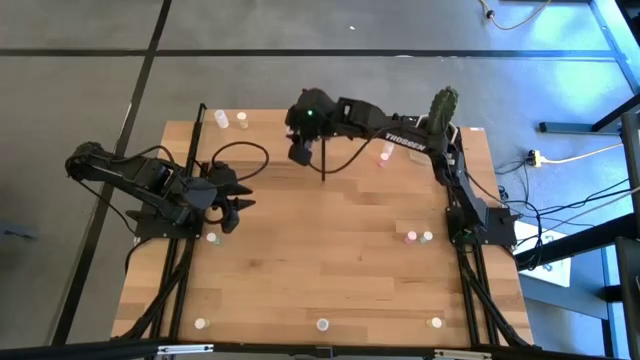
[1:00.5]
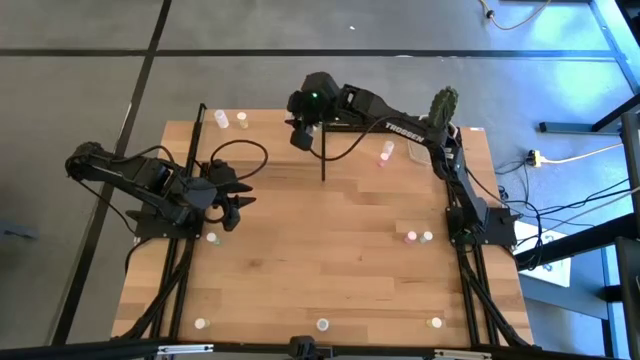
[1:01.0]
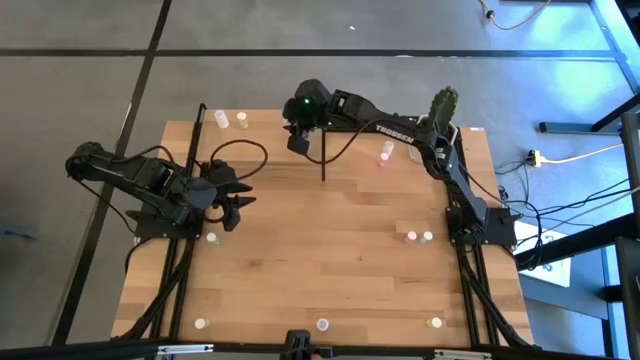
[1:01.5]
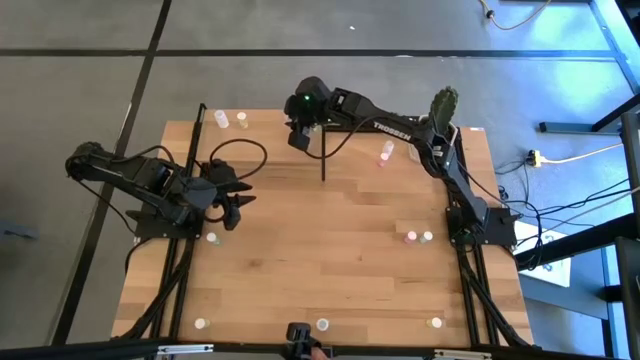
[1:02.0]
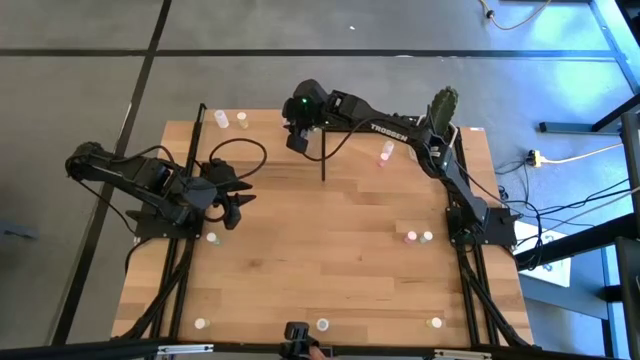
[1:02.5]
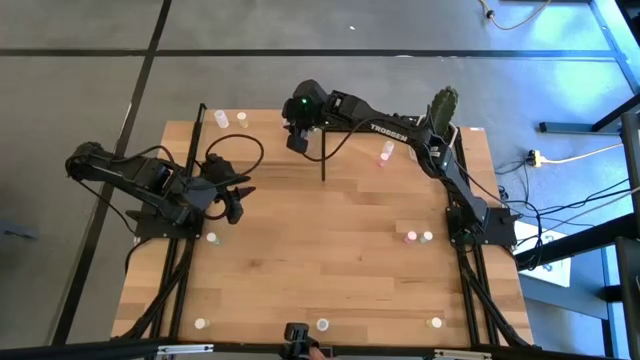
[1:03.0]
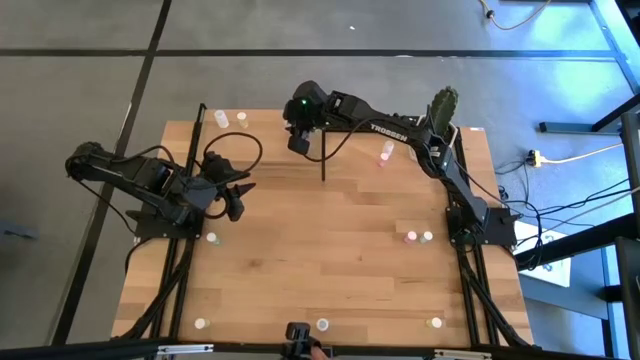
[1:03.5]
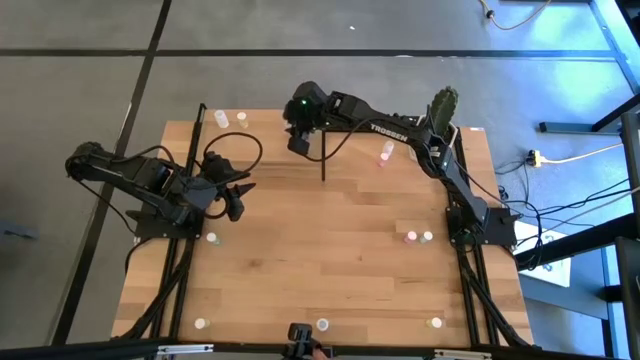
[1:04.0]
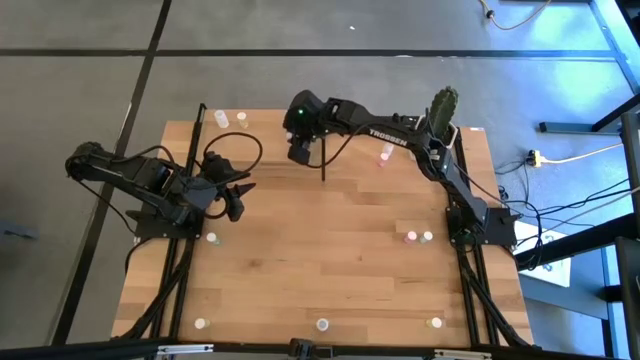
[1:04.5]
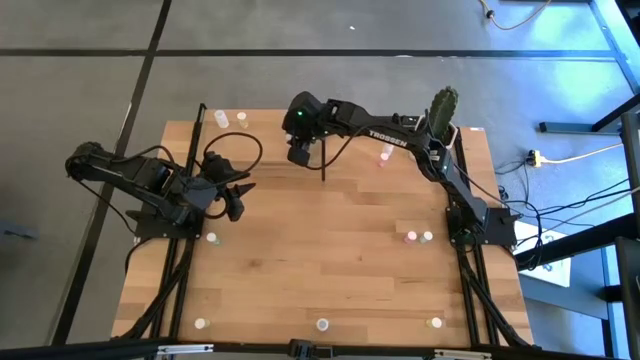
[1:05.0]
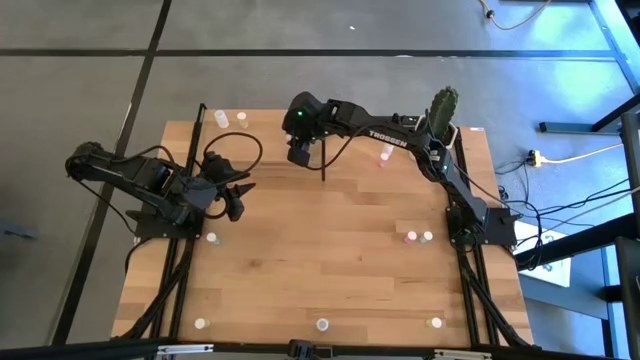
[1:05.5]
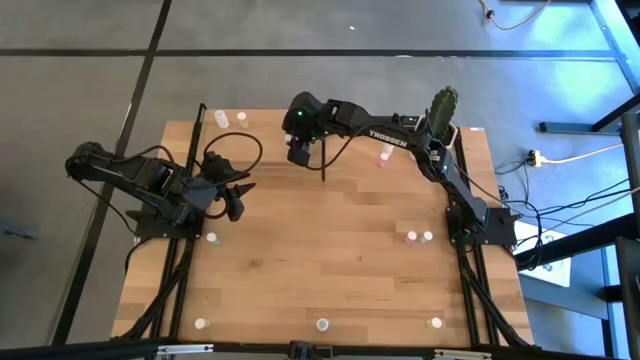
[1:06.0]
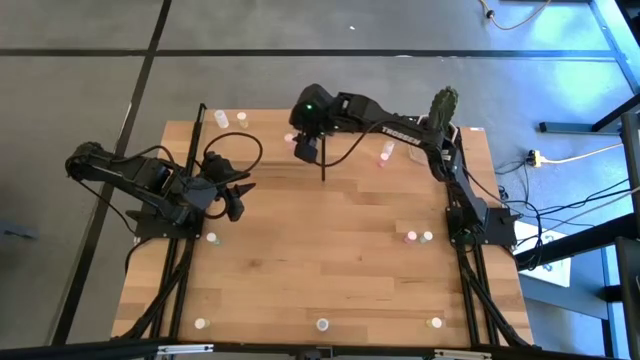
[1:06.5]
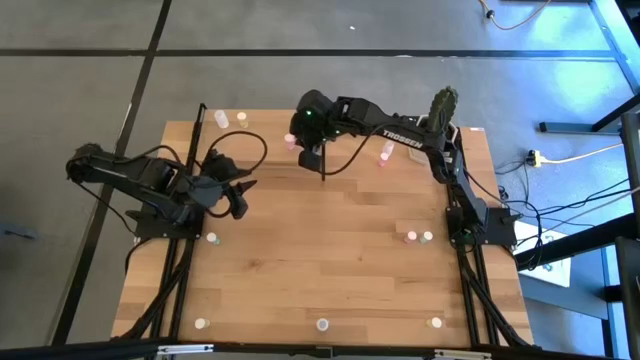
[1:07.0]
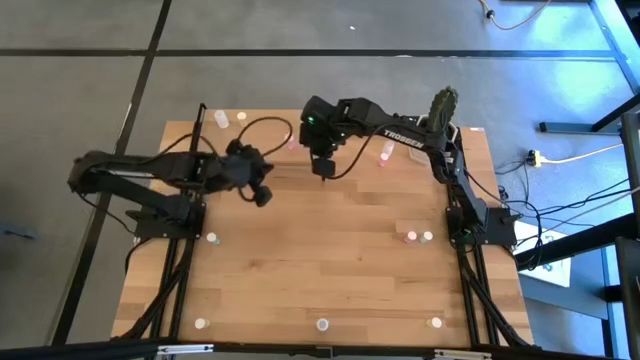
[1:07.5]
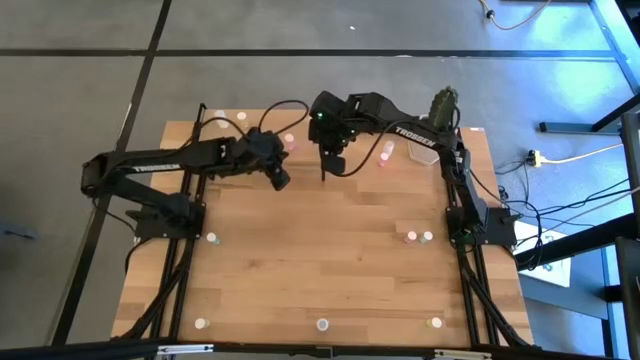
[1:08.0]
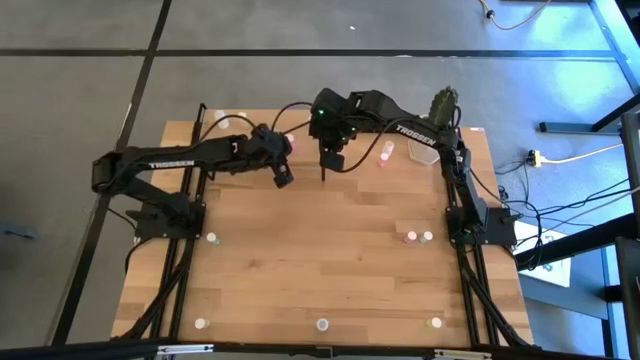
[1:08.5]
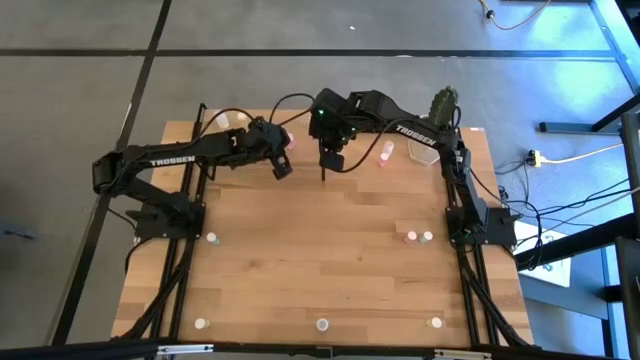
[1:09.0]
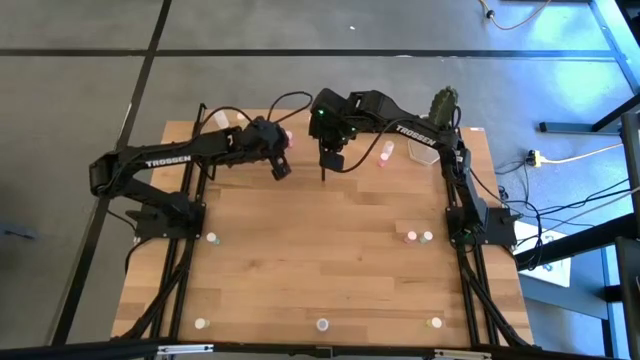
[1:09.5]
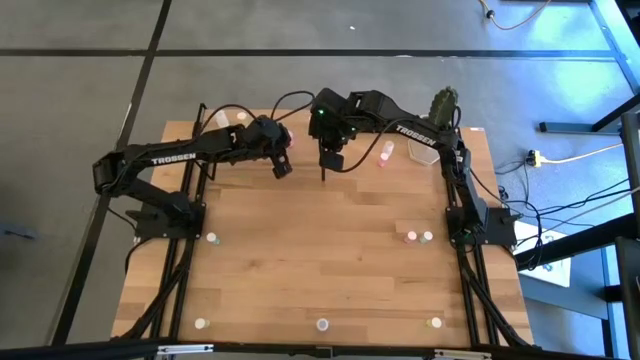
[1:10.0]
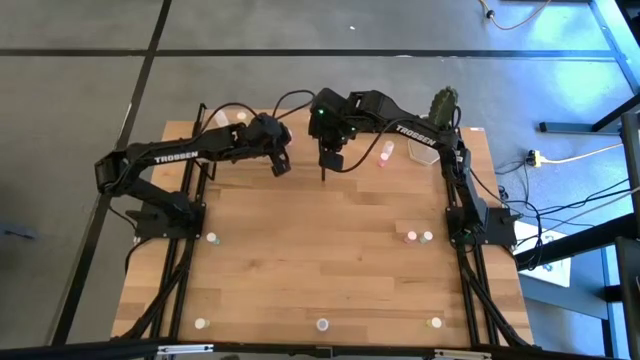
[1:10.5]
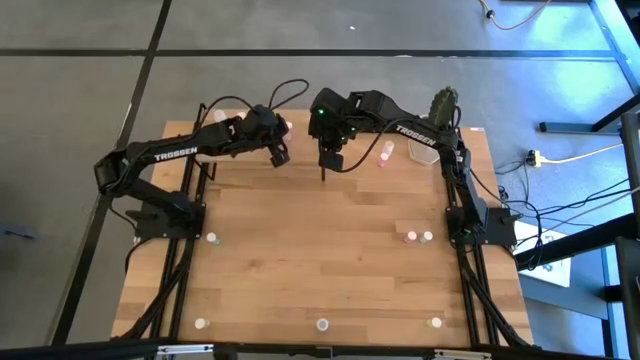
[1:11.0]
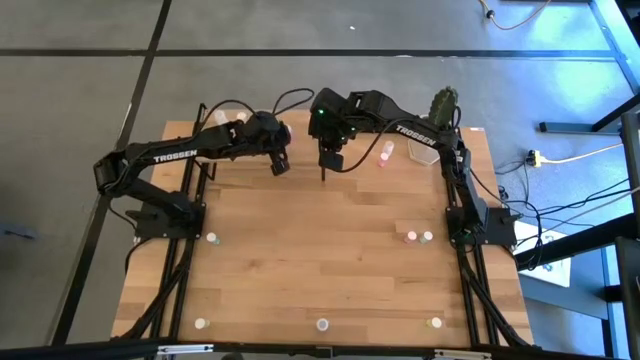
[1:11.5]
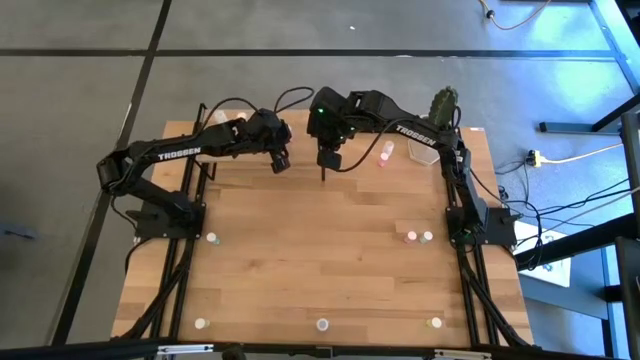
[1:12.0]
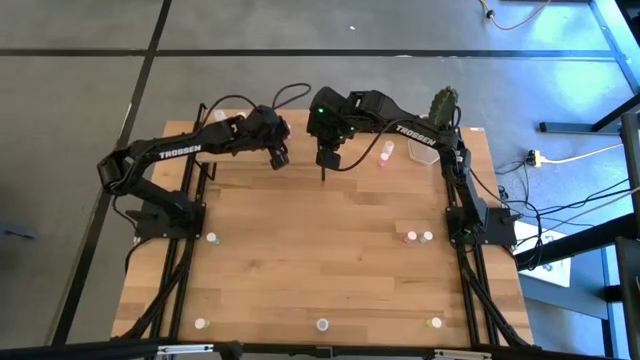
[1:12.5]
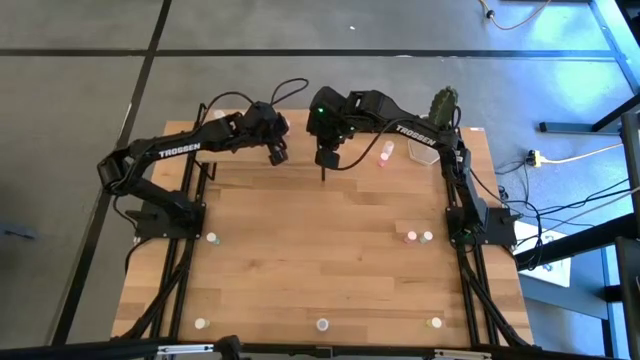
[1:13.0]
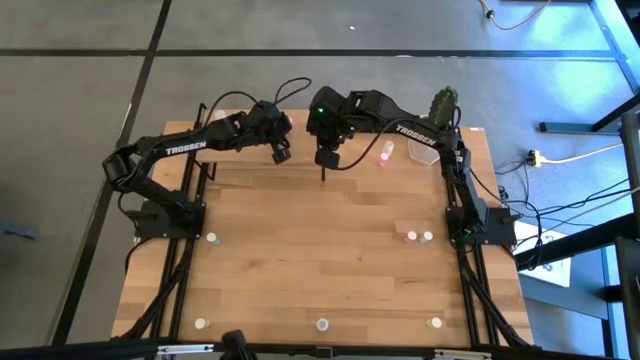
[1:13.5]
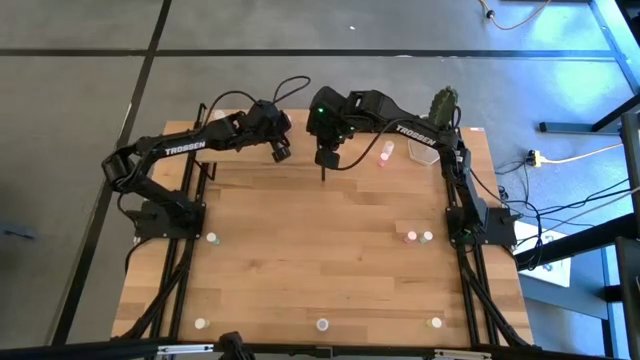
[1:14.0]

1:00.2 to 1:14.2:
Task: Pick and place medicine bottles onto shelf by color
Put the bottom pink pill bottle on the shelf

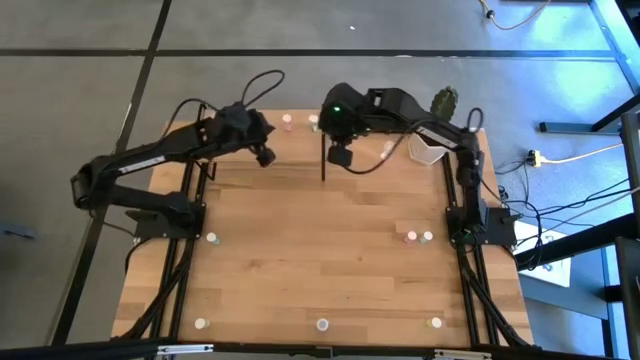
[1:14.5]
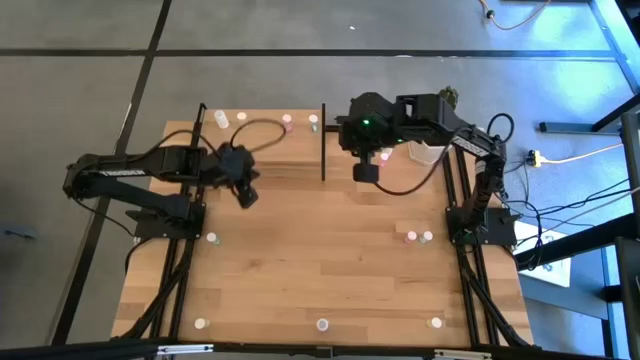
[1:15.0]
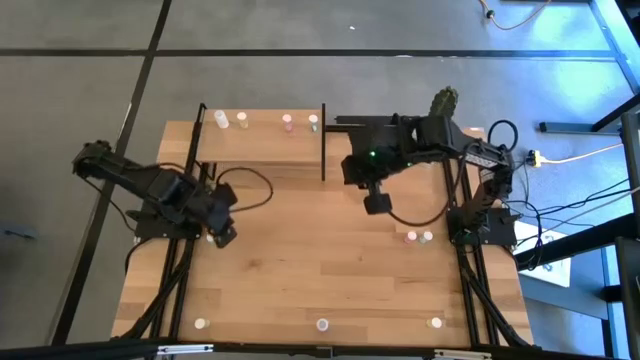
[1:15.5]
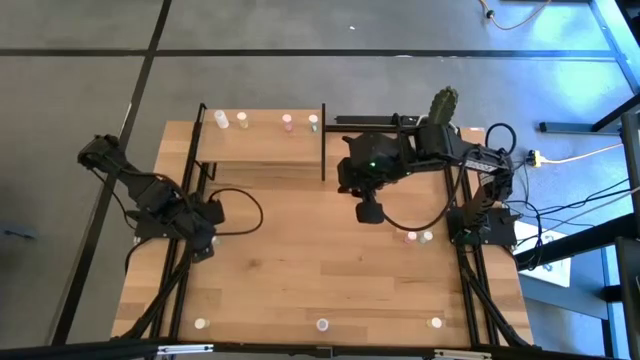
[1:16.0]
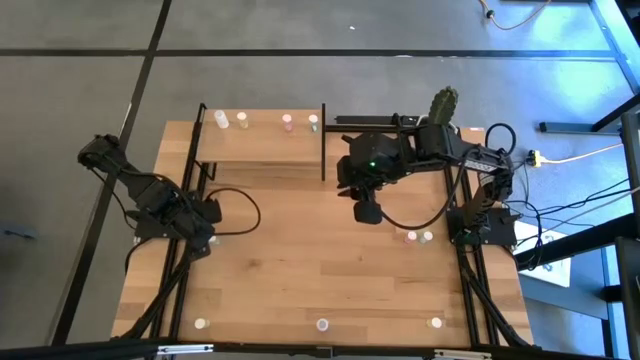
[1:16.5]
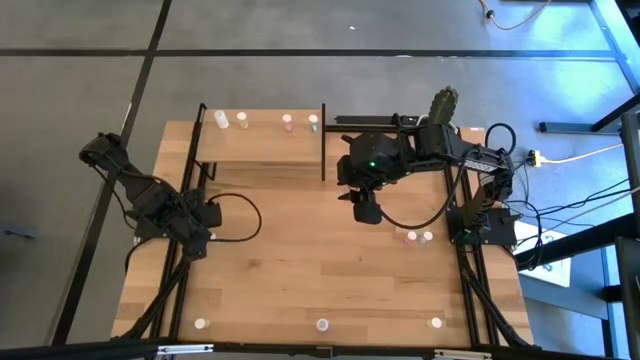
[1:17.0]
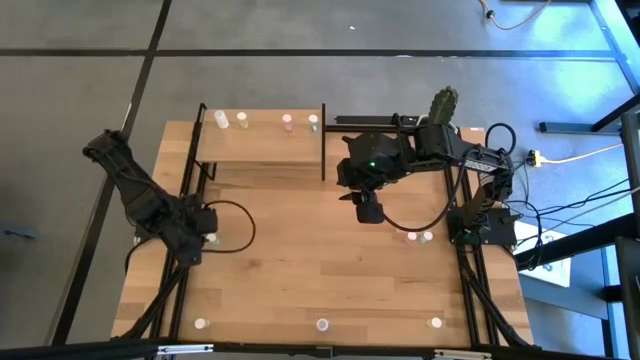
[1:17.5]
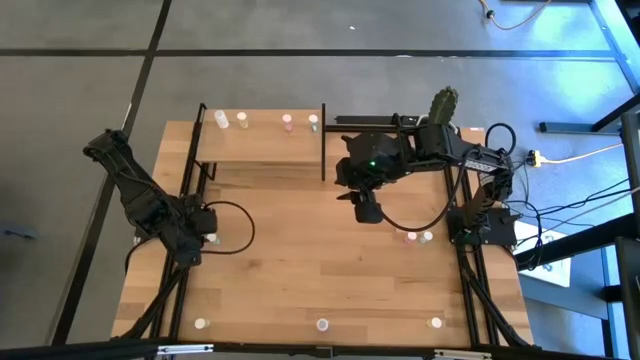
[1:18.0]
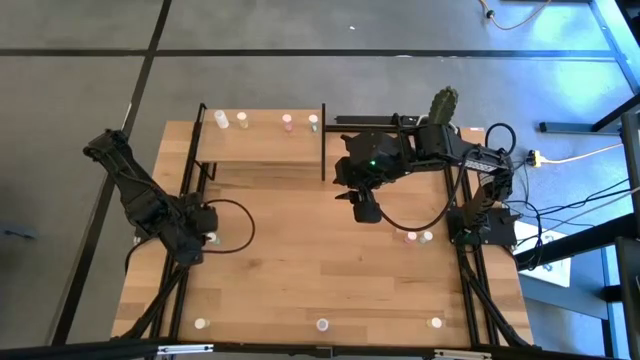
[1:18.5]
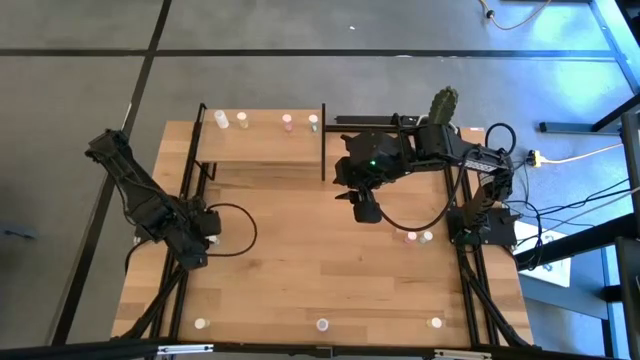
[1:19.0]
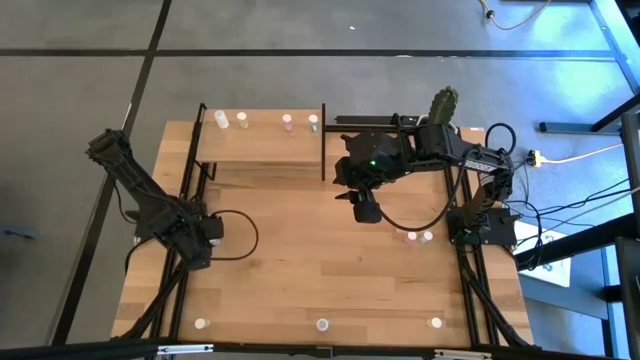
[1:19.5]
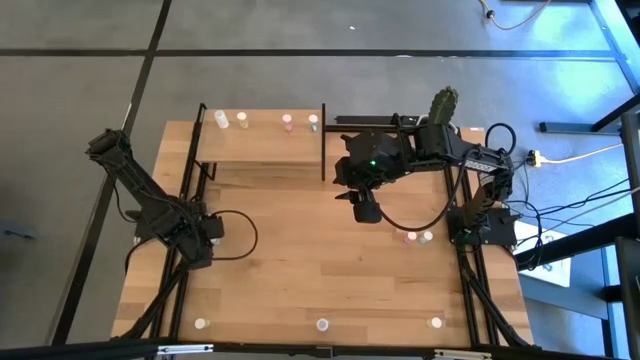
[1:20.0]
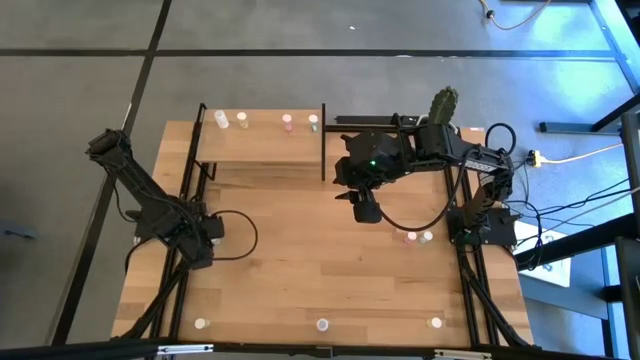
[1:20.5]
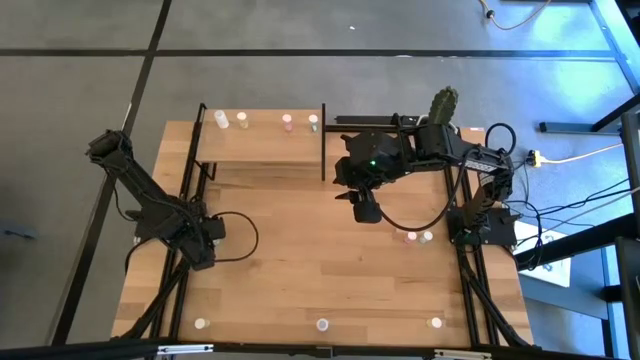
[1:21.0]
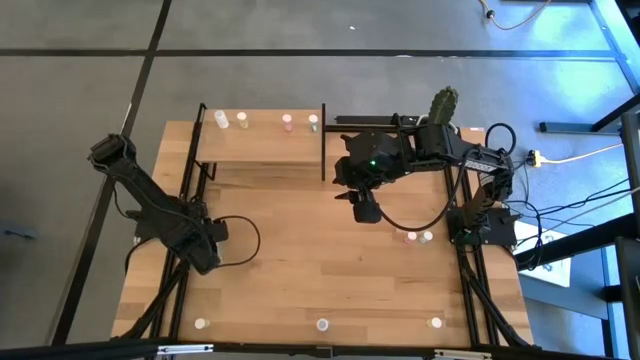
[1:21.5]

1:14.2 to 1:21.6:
Put the left green pill bottle on the shelf
